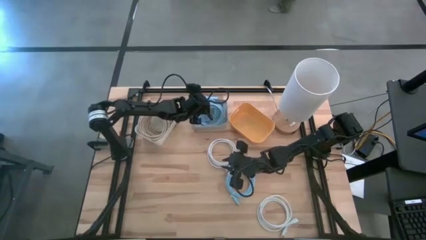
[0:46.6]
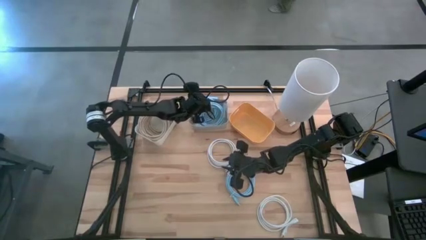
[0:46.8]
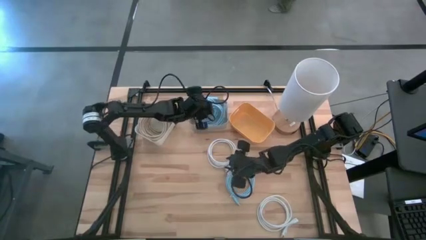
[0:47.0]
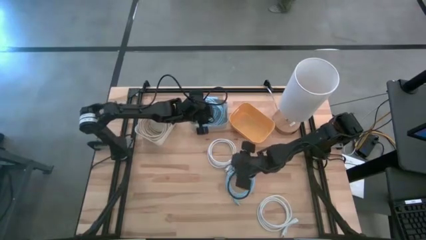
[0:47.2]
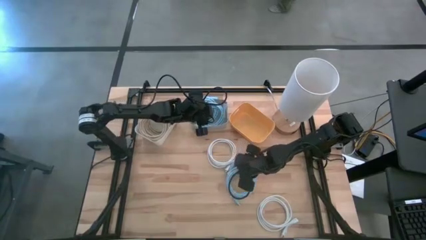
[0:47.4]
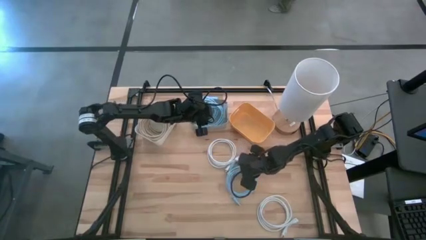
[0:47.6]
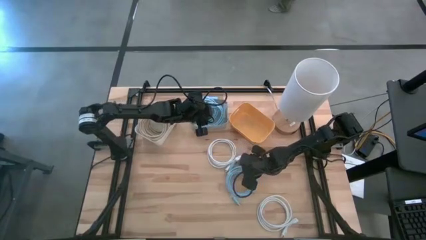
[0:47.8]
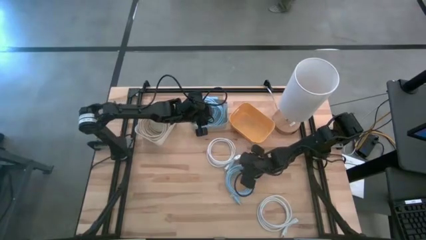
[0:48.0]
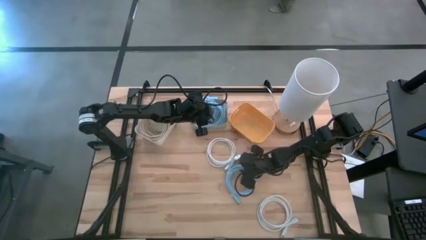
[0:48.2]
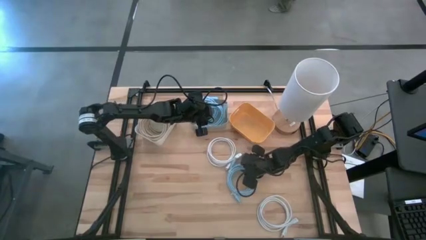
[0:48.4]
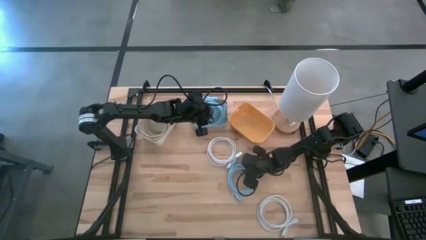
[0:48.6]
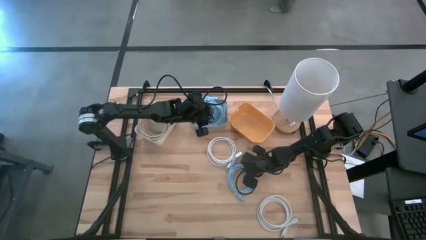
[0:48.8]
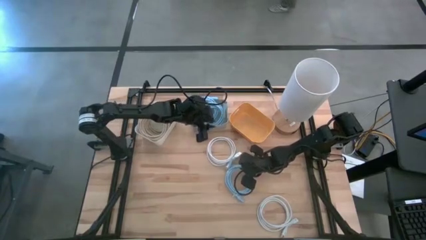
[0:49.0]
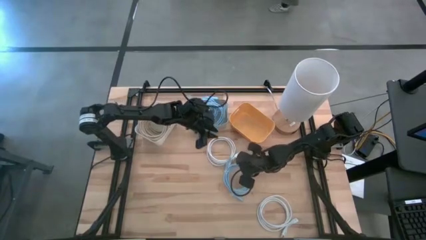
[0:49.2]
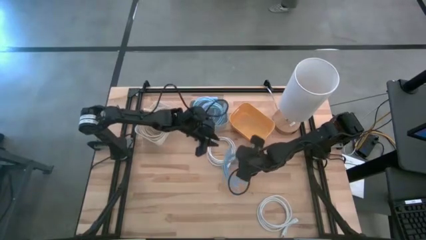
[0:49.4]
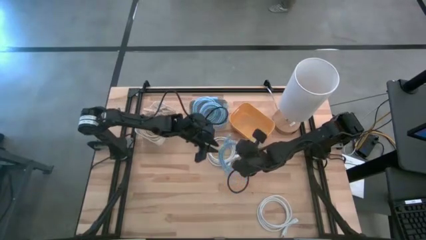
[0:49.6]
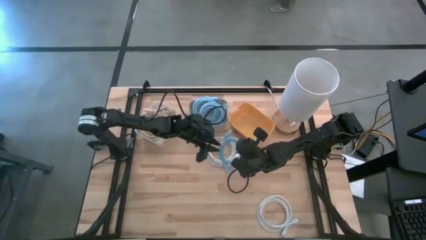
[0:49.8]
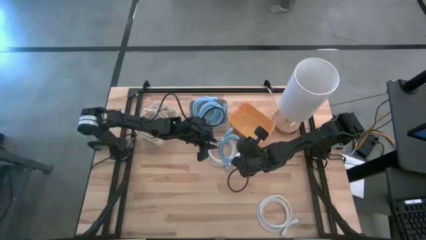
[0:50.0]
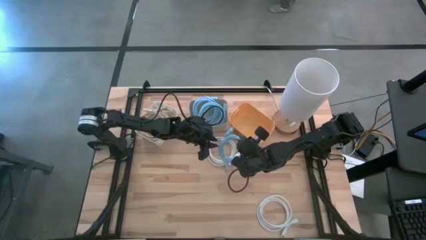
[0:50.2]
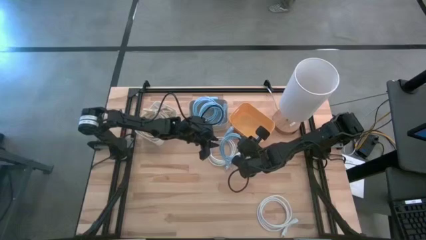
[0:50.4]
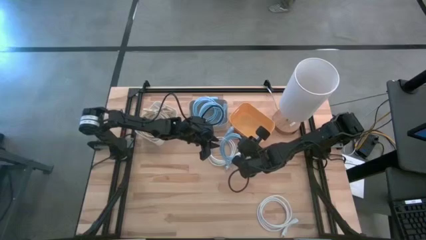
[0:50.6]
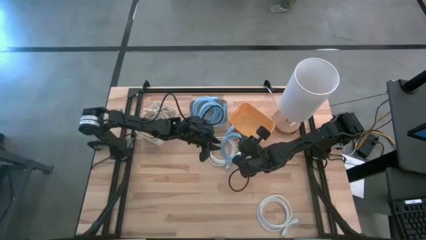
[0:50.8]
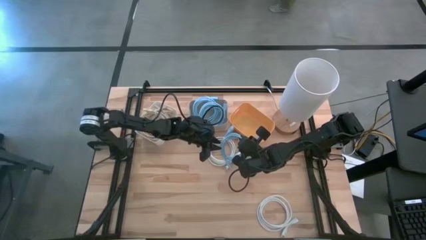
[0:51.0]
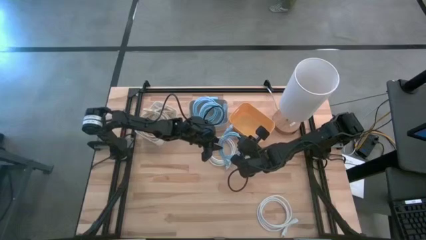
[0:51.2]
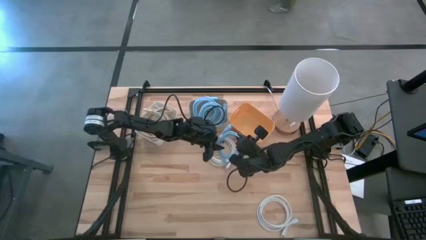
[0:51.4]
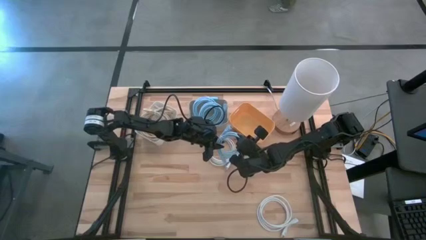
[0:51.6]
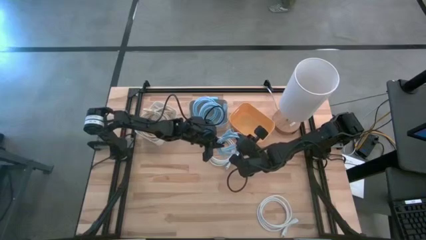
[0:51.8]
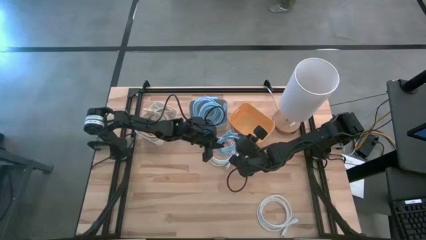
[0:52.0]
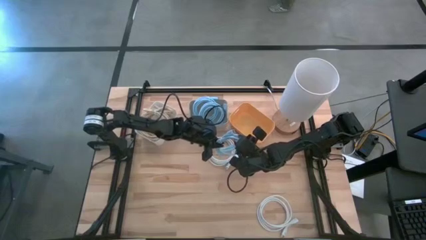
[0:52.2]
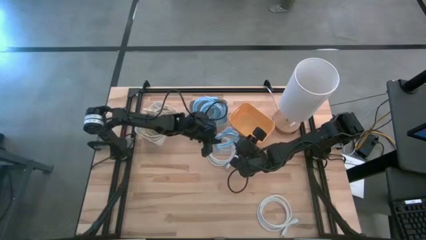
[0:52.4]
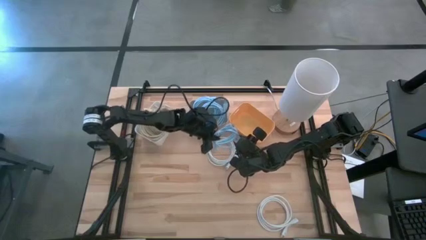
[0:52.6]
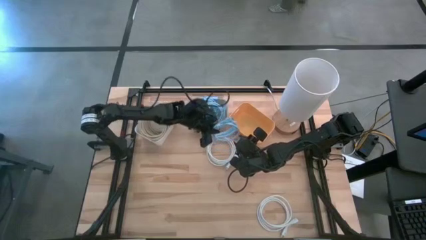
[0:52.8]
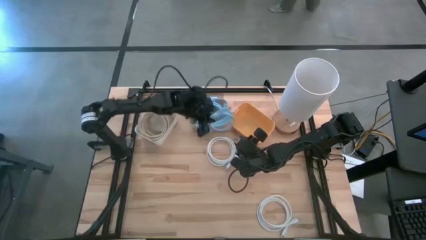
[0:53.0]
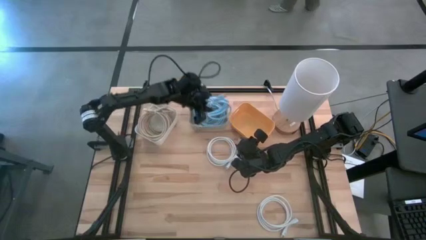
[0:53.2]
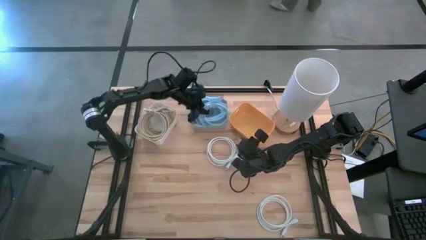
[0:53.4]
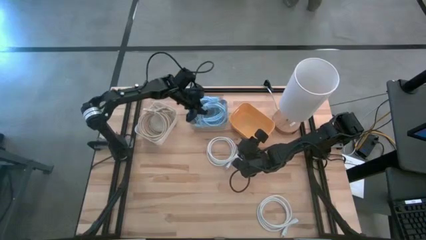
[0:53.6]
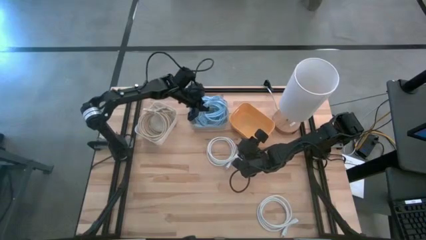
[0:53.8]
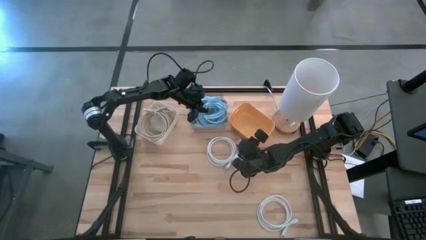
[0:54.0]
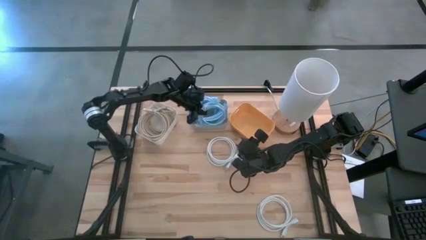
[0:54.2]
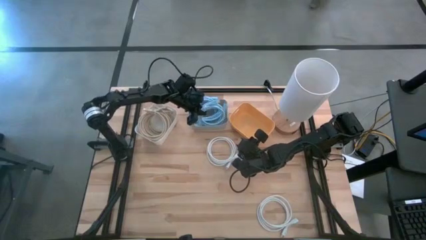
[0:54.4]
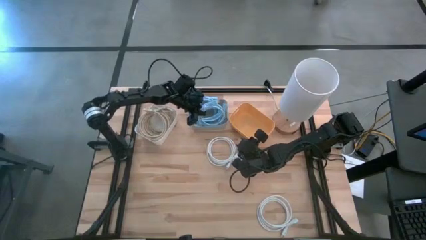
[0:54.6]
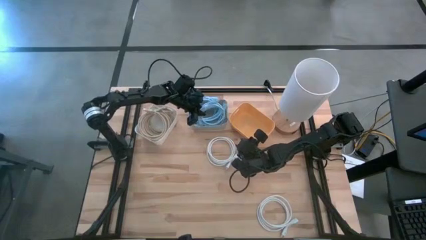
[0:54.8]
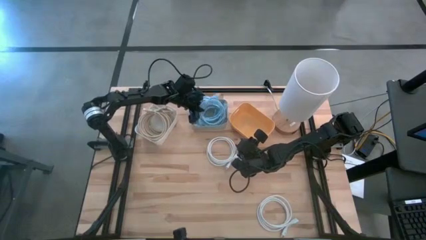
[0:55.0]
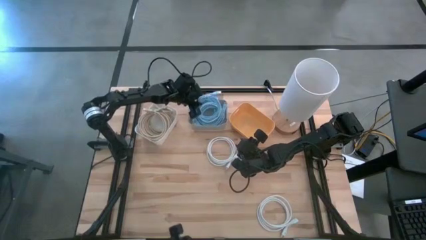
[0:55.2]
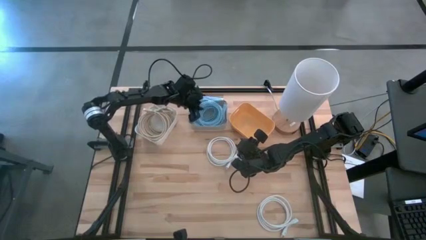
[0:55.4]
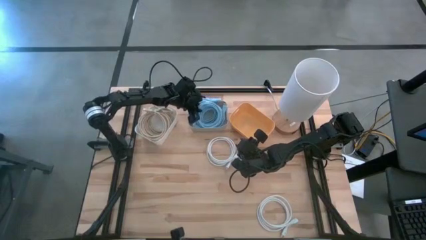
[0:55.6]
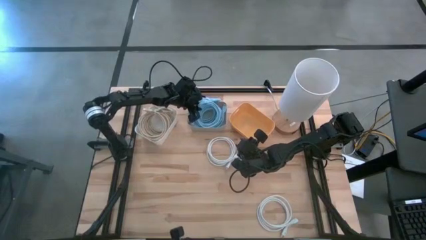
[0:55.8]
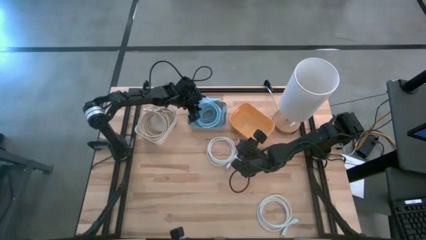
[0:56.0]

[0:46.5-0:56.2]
Task: Sort HDMI cables
Put the blue HDMI cable into the gray bin

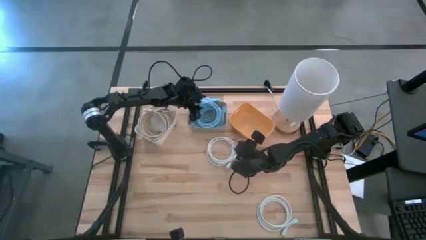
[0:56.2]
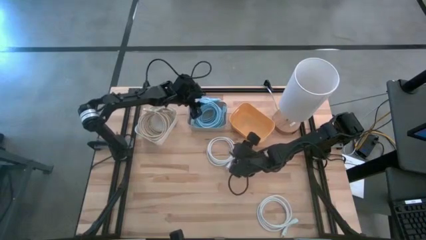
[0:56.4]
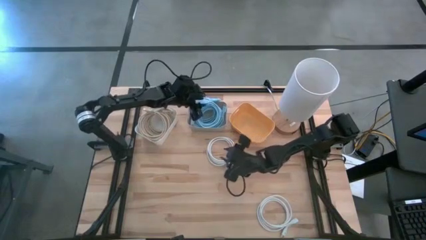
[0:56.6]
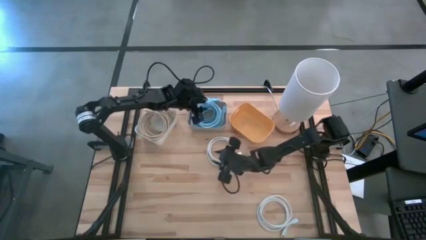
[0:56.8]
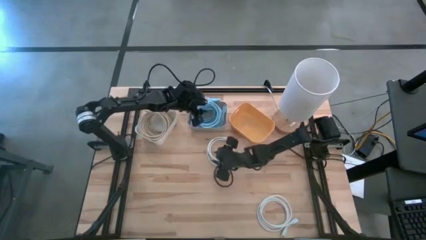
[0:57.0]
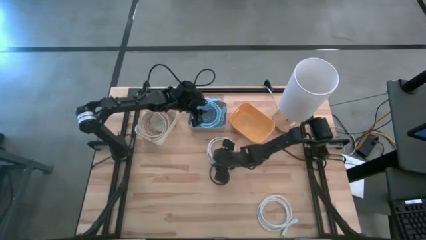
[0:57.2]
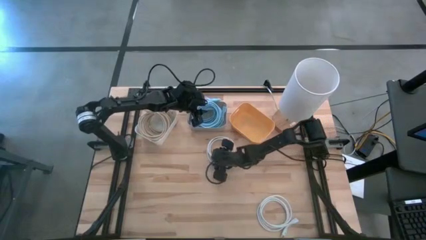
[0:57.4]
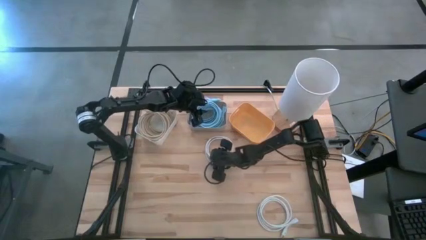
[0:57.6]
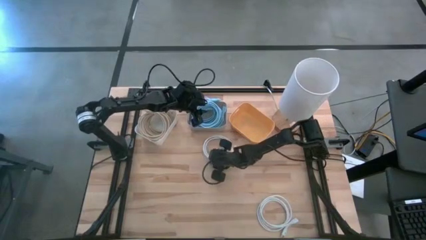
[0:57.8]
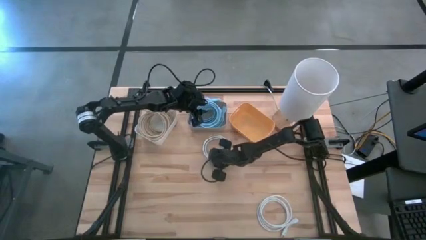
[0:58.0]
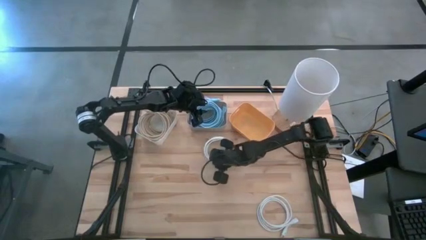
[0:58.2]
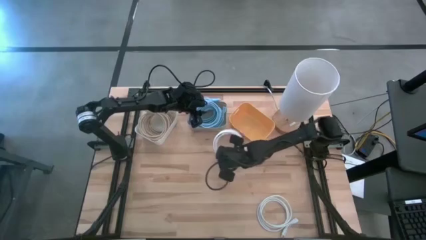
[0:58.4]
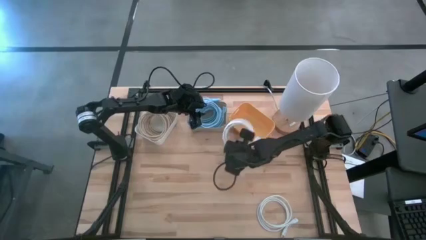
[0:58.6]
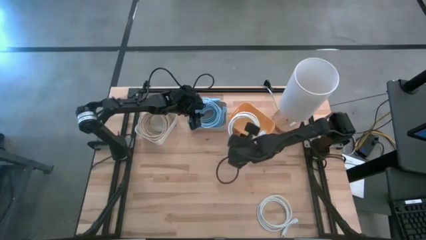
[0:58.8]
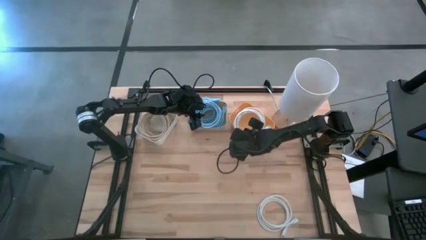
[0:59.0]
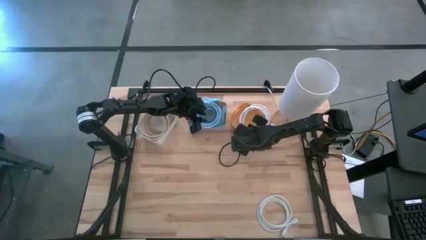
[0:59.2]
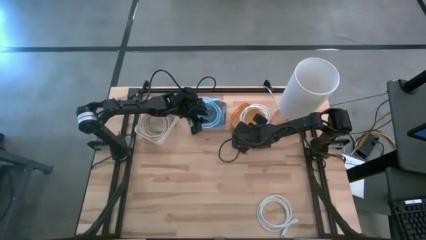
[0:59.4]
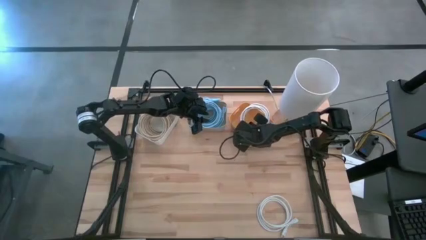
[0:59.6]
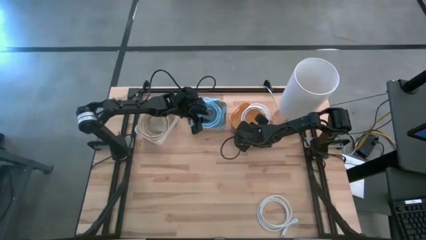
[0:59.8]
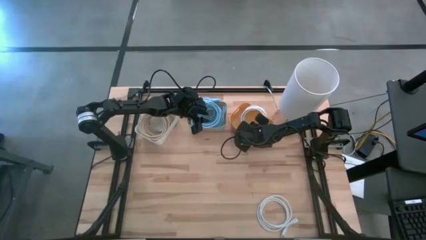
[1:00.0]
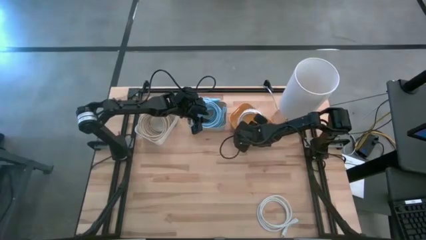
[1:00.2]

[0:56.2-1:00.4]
Put the top white HDMI cable into the yellow bin

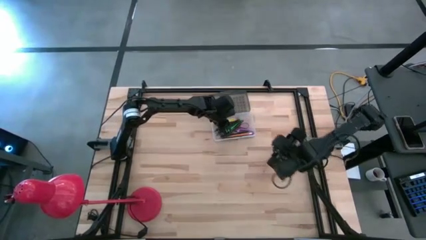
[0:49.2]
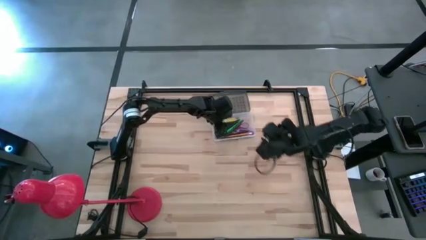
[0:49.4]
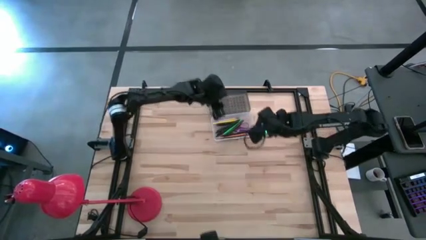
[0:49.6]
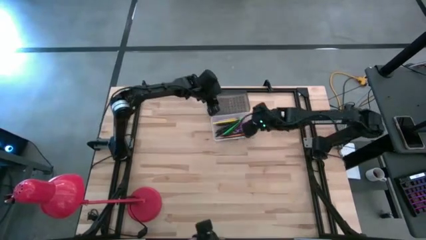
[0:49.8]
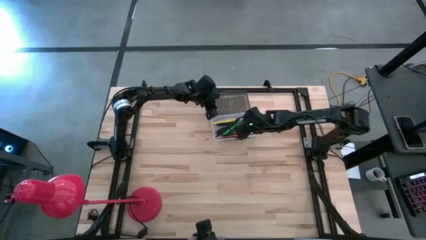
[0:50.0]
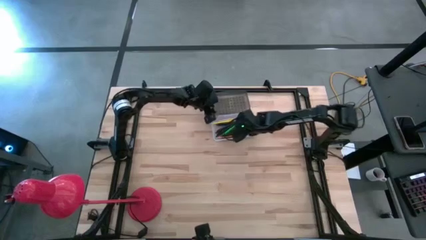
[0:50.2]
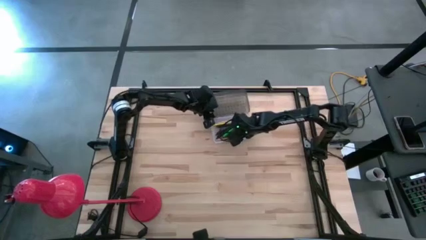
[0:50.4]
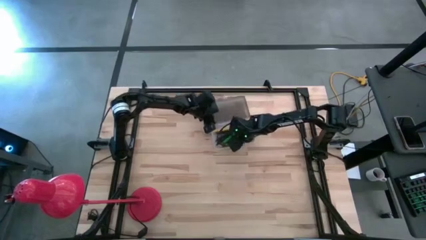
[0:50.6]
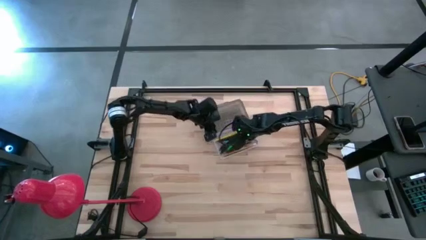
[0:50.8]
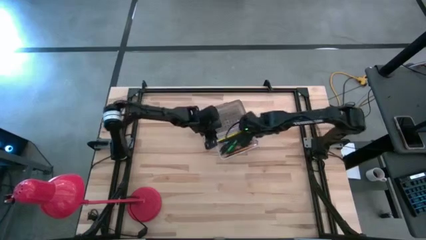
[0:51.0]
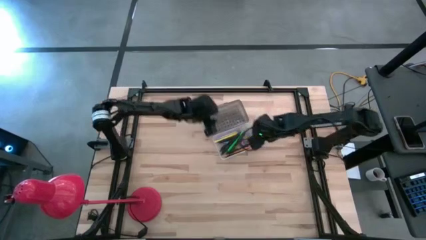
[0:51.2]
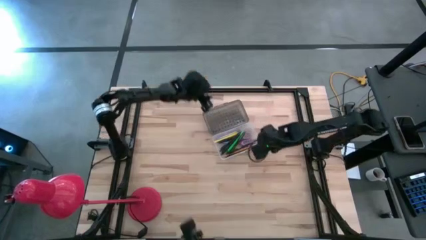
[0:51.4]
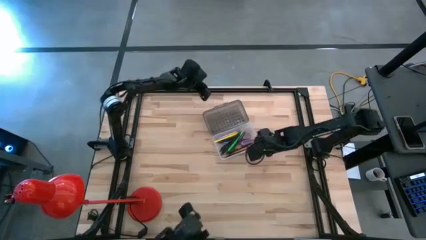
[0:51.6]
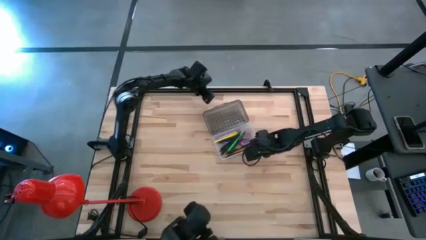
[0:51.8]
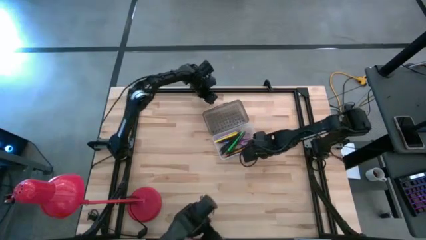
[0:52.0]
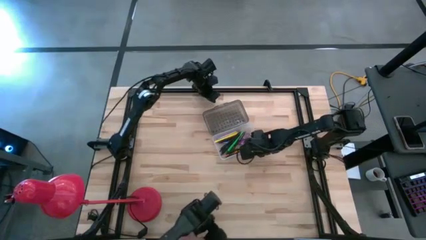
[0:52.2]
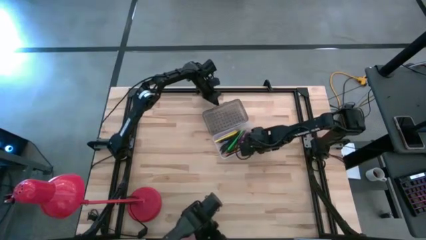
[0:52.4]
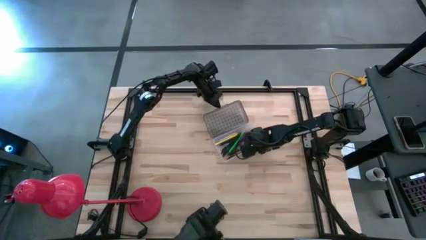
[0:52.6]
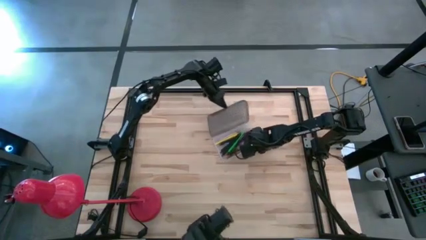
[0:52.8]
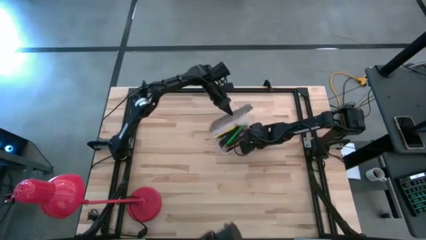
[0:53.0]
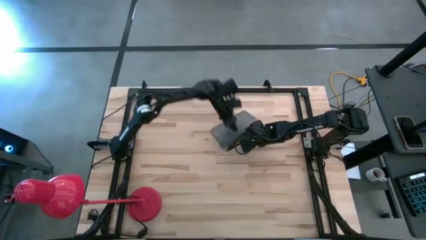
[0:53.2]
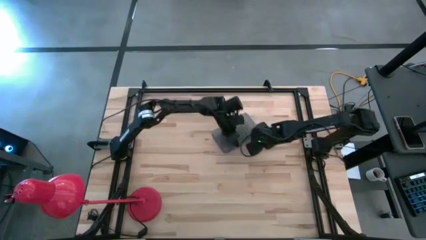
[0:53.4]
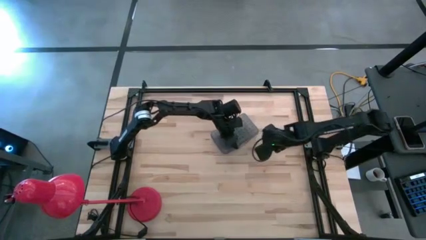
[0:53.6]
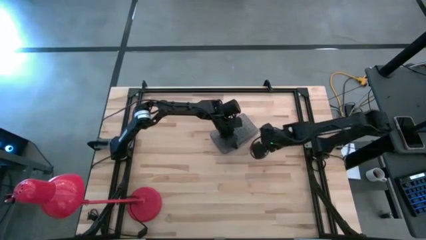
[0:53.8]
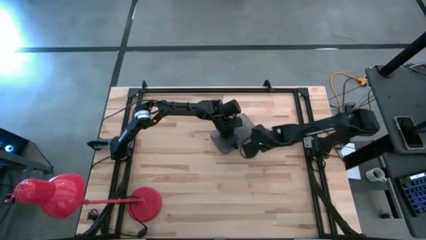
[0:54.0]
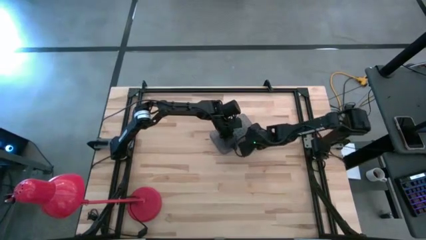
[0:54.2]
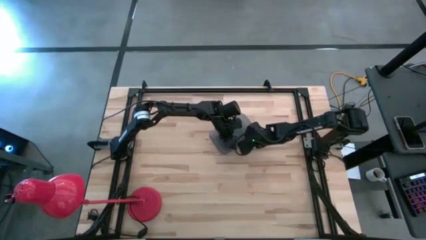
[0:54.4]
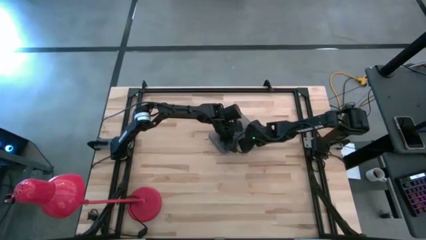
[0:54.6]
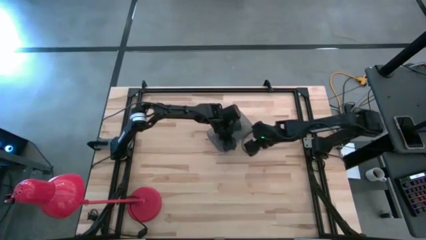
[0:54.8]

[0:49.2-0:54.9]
Task: Pick & place school supplies into a supply box
Close the gray supply box
